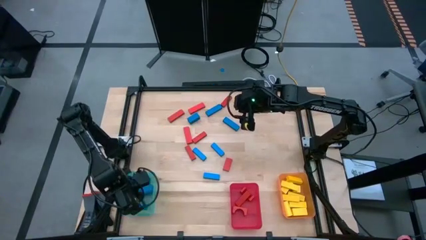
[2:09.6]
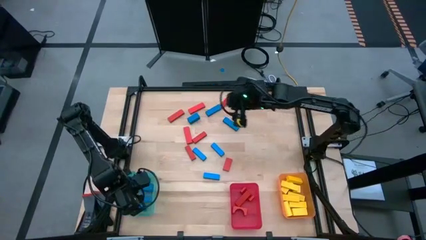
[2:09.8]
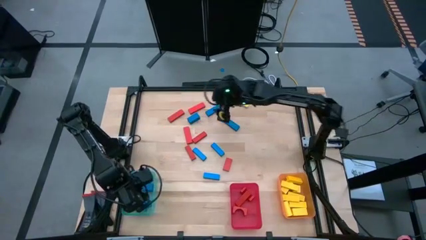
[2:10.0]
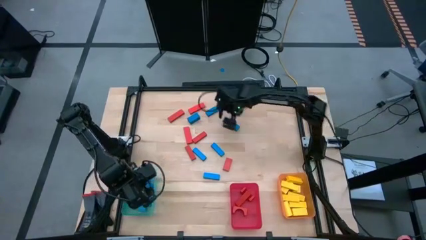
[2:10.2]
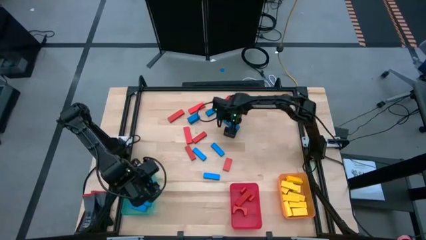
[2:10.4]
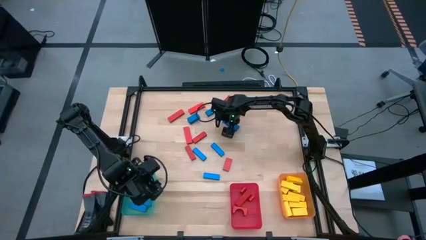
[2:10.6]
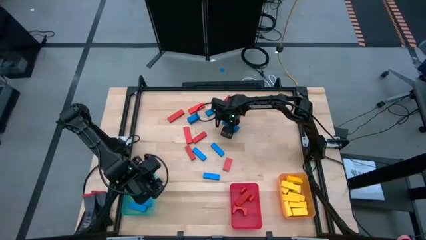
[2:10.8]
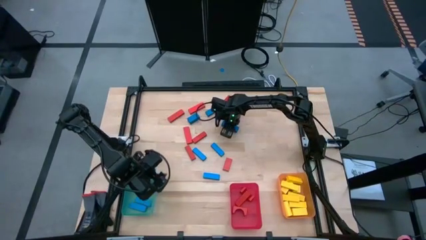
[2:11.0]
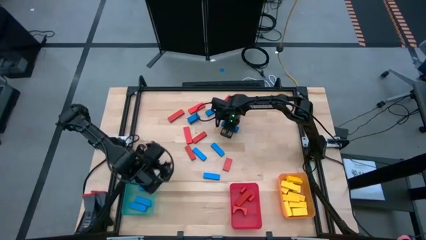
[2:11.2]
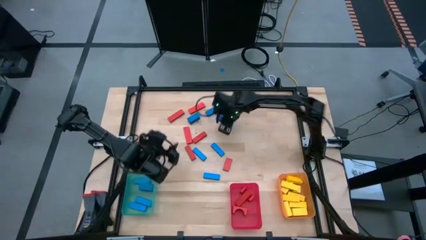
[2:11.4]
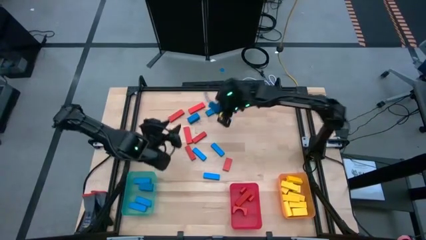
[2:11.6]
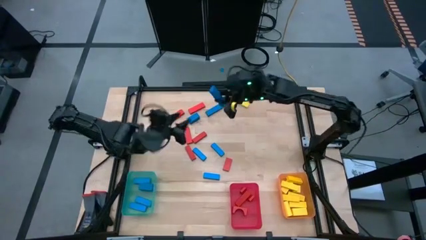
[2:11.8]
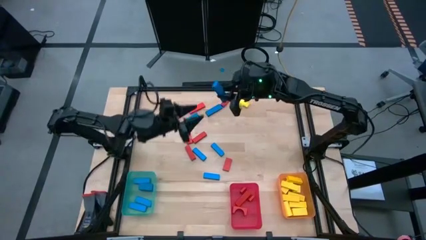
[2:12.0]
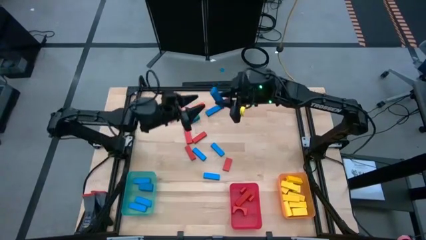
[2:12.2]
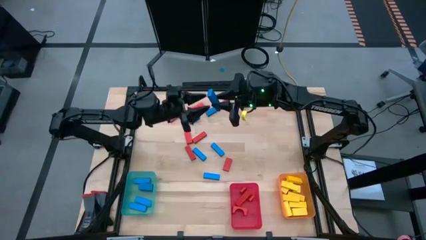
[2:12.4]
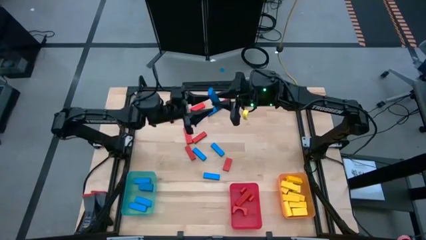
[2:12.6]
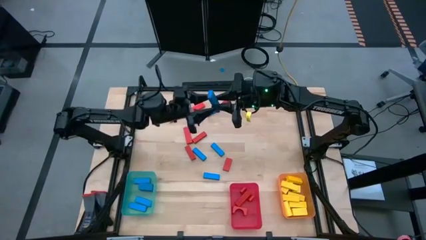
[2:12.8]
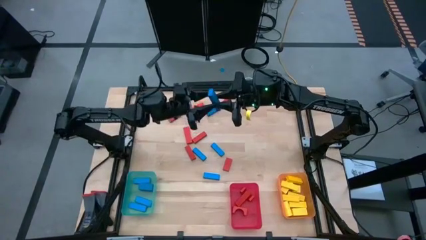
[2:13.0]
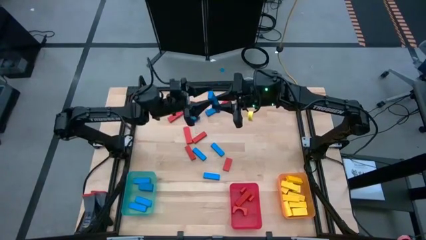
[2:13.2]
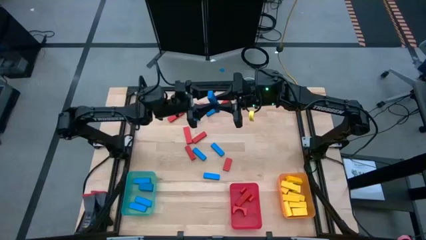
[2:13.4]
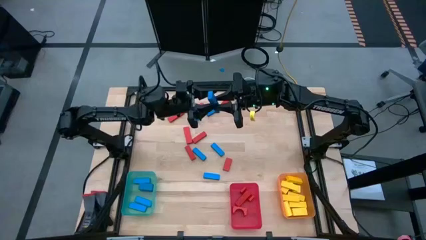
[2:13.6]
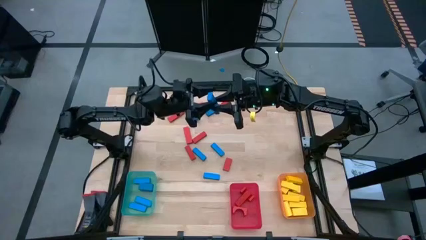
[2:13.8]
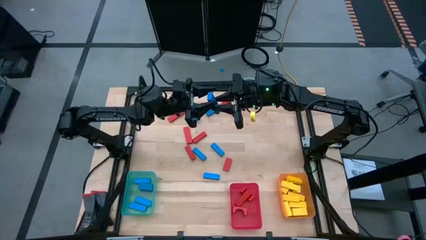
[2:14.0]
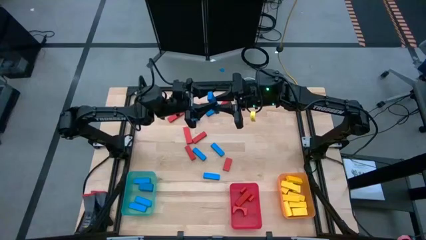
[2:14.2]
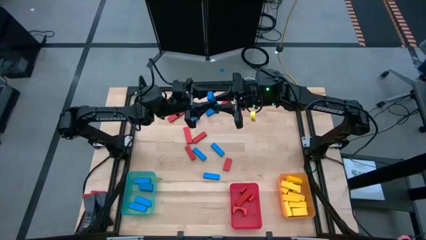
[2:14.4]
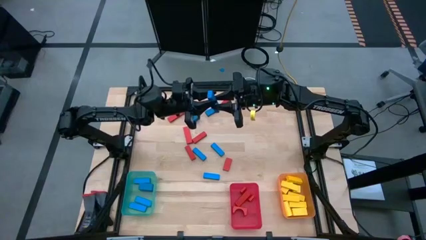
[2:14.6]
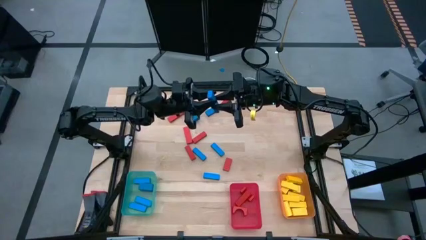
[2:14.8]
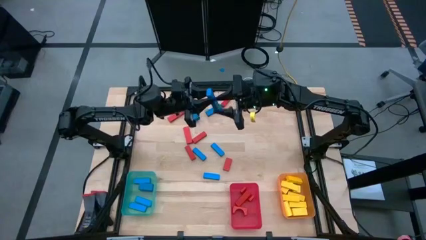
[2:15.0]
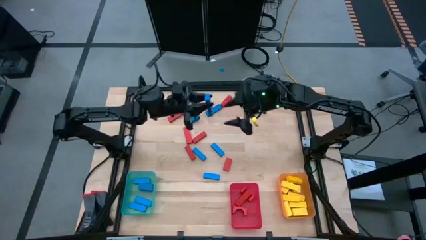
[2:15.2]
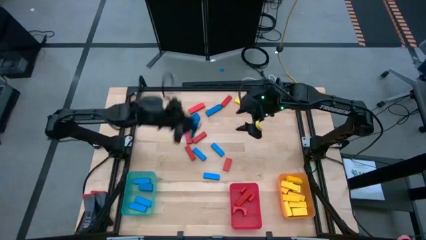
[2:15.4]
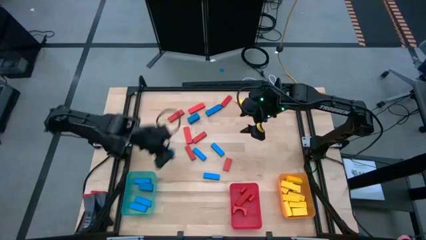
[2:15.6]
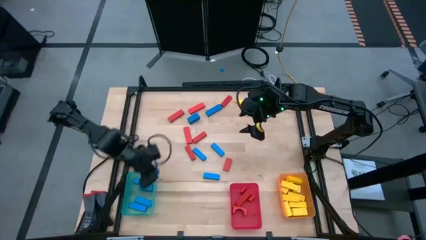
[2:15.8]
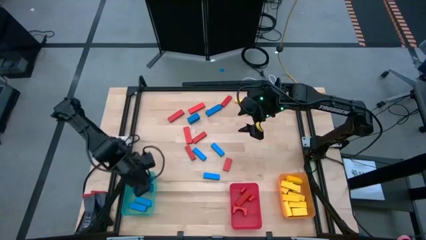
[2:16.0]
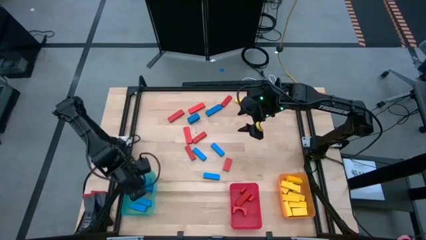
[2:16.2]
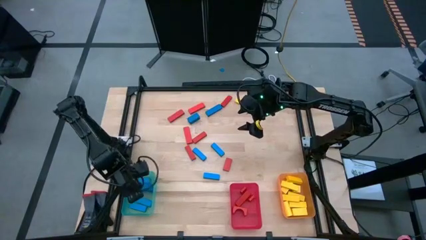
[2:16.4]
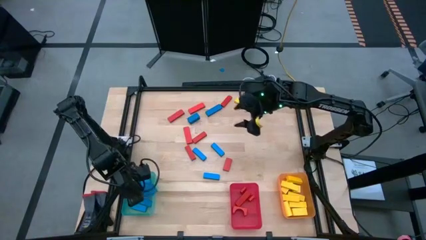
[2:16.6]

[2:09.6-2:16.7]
Task: Sort blocks
Put the blue block into the blue bin

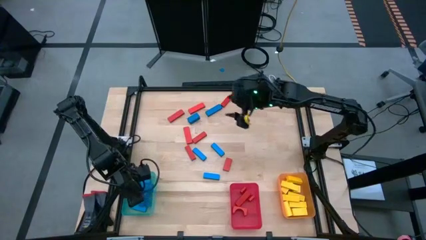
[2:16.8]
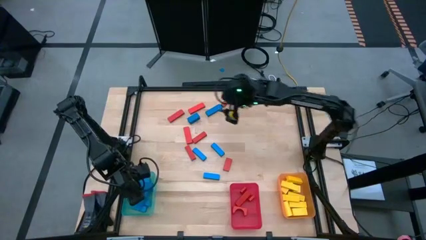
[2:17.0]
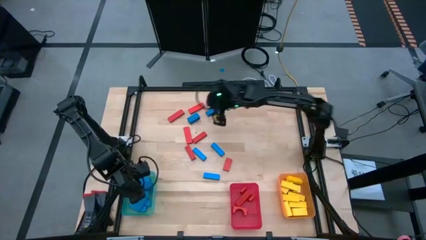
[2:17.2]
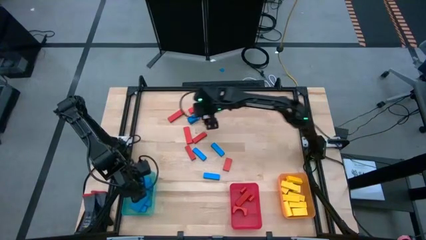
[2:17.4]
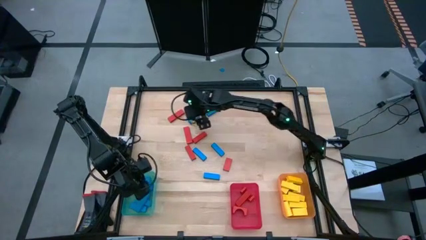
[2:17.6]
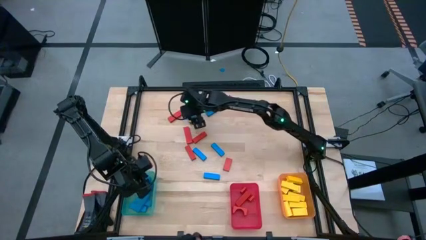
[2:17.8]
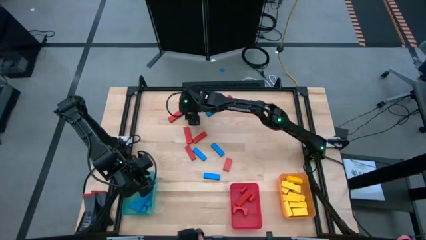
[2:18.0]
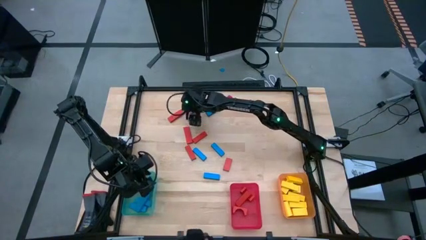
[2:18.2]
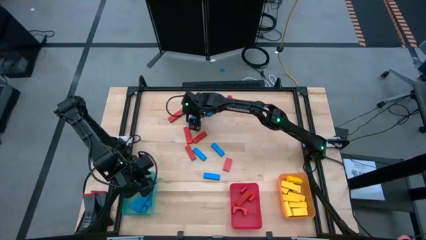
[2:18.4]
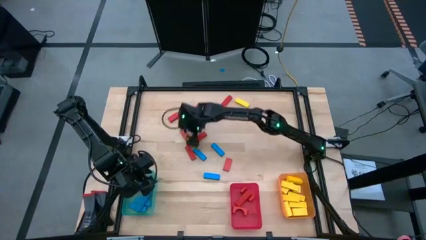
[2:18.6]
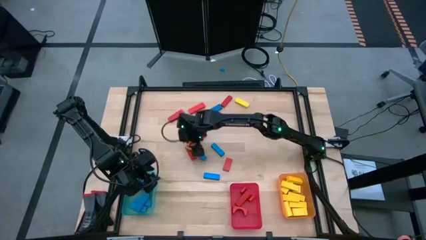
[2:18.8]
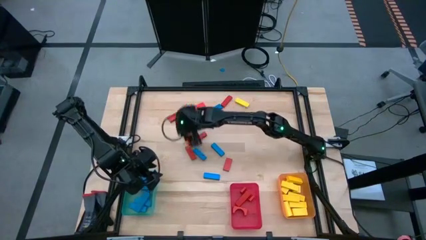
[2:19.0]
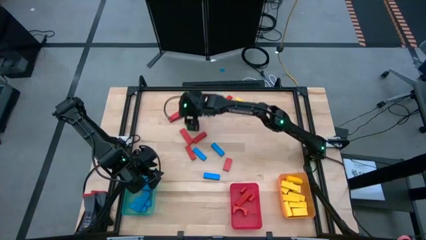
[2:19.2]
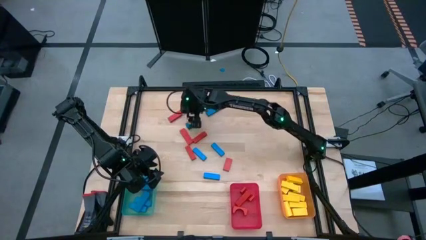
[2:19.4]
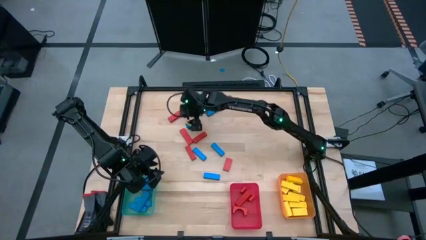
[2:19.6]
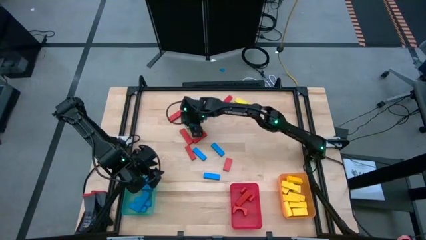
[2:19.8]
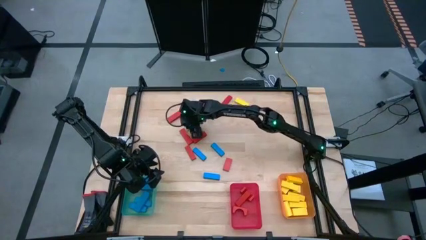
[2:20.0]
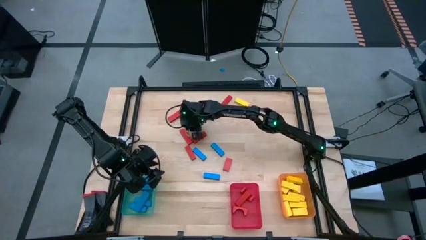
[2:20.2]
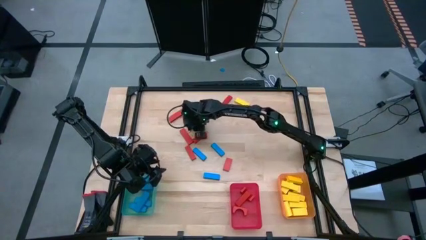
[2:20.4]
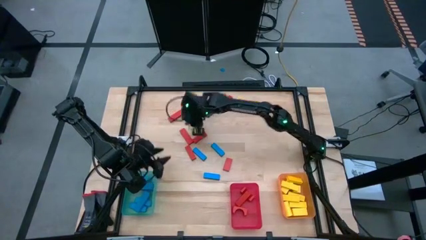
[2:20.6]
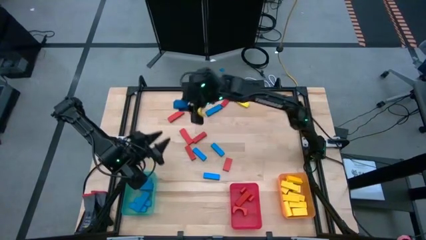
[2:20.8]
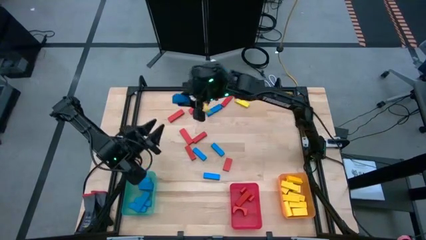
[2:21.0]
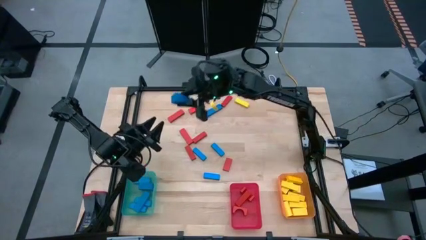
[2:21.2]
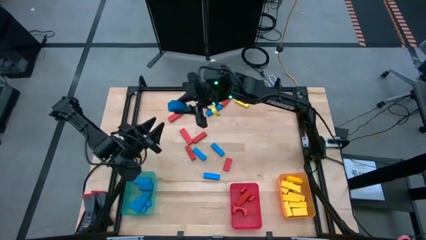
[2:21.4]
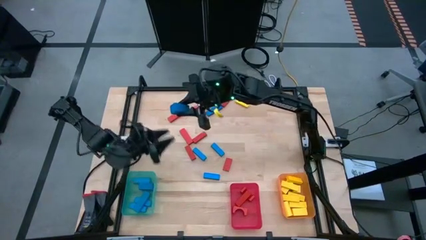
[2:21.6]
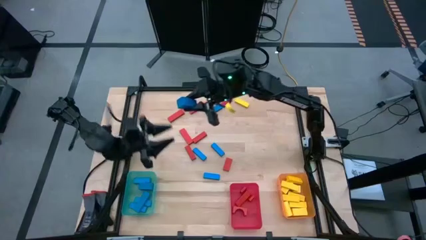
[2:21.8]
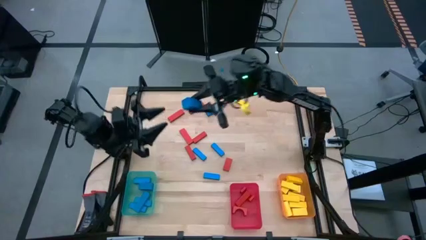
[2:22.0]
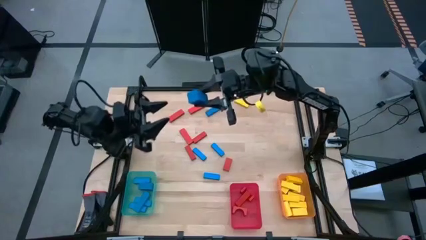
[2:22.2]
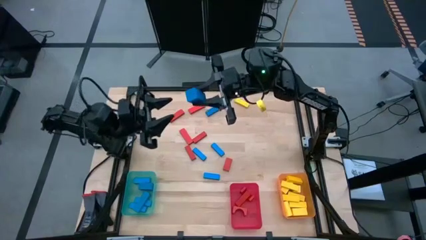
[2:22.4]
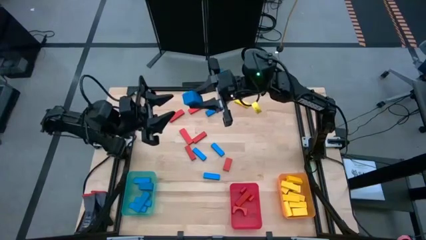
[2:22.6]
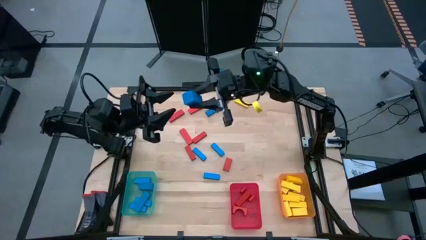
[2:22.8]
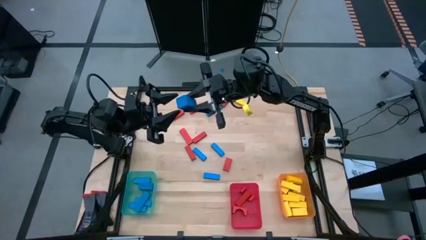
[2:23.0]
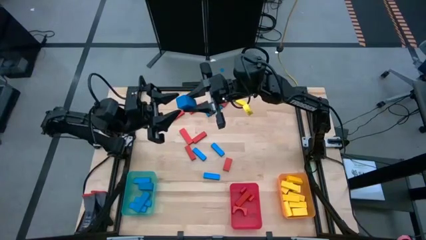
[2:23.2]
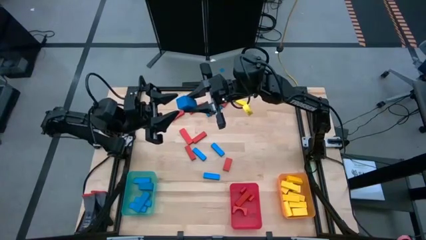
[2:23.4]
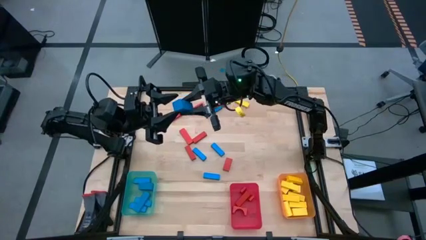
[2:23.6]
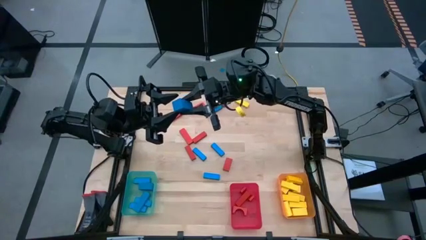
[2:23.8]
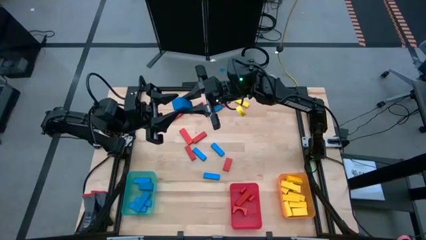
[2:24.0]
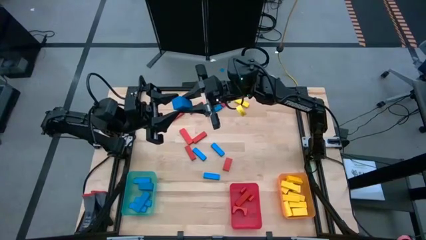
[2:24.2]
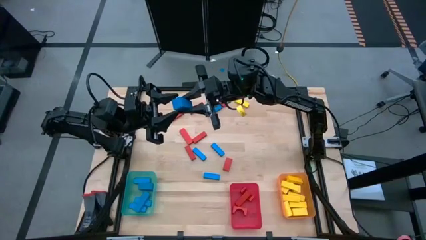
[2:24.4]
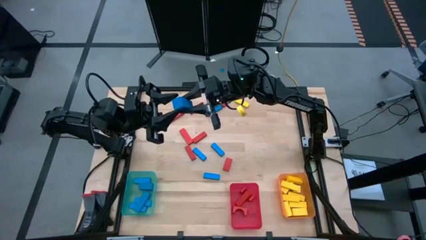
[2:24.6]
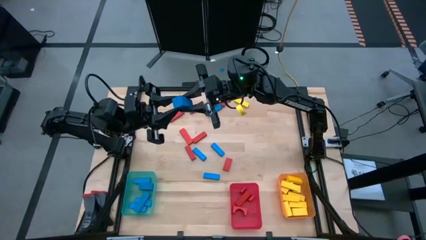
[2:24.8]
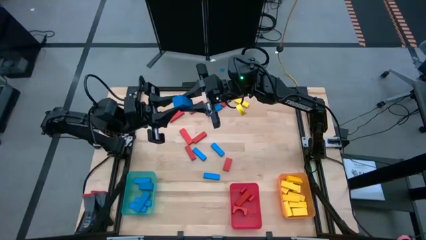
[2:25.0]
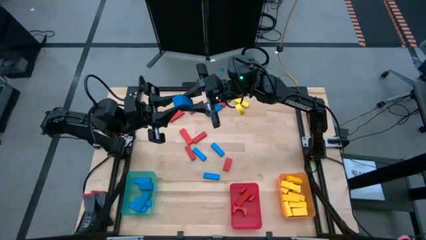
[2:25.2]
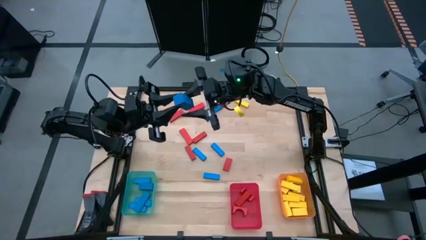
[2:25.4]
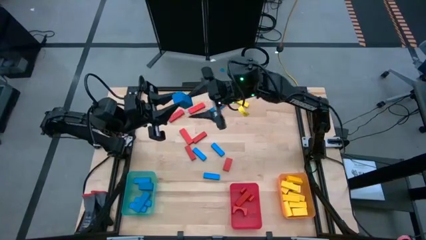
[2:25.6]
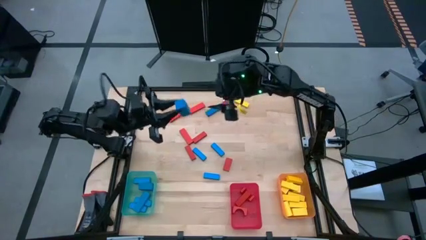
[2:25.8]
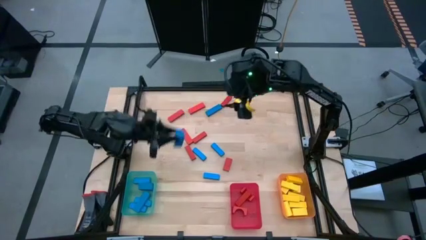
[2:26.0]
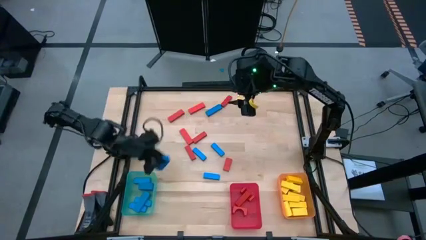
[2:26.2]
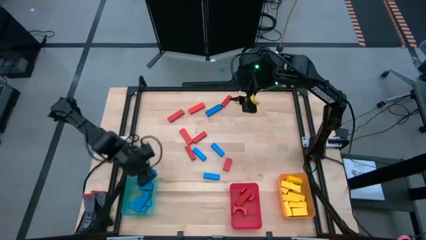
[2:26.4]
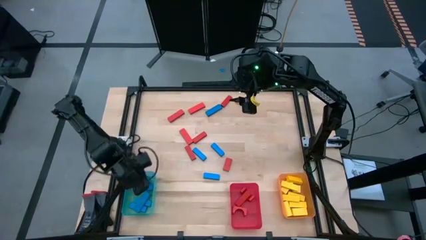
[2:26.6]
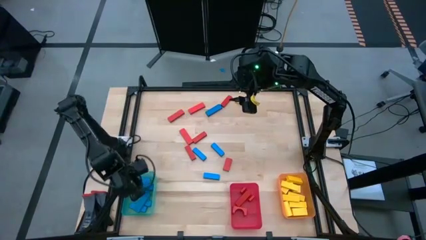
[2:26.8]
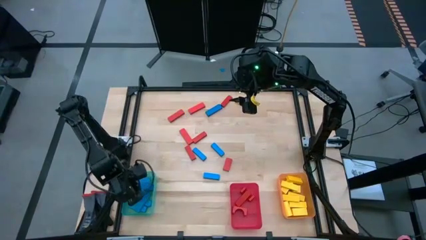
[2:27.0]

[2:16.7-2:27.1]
Put the blue block into the blue bin
